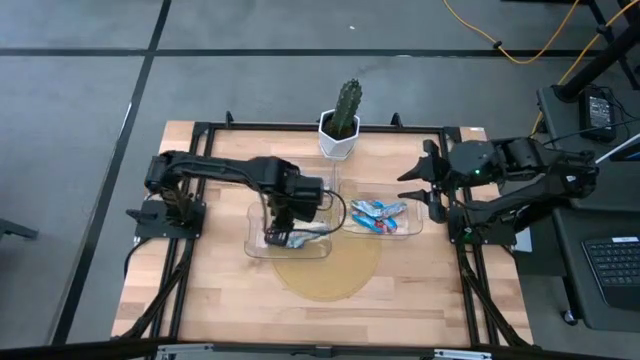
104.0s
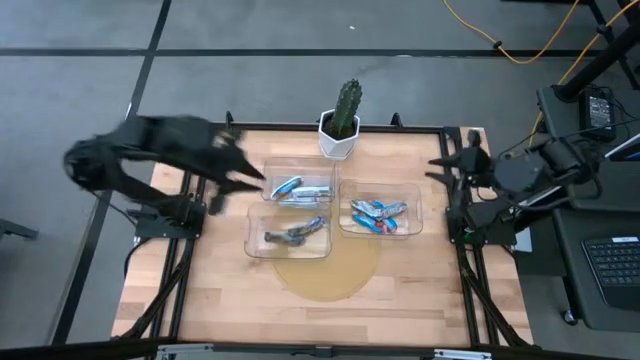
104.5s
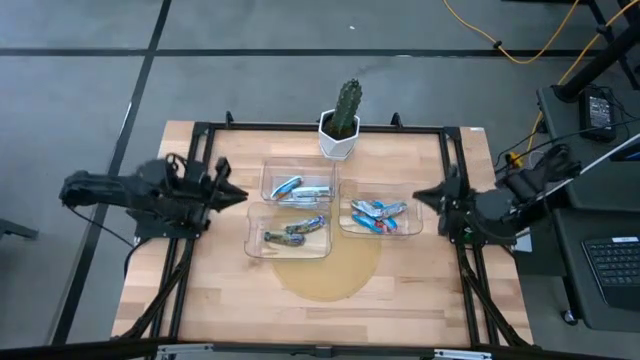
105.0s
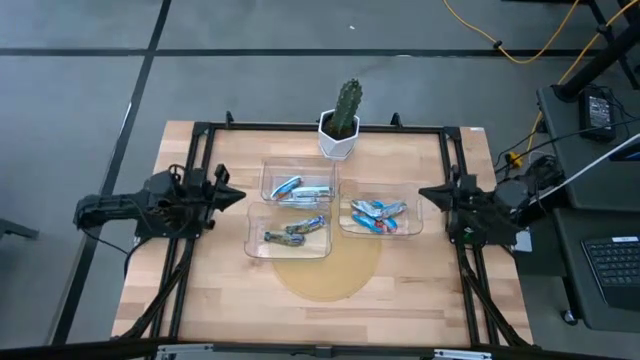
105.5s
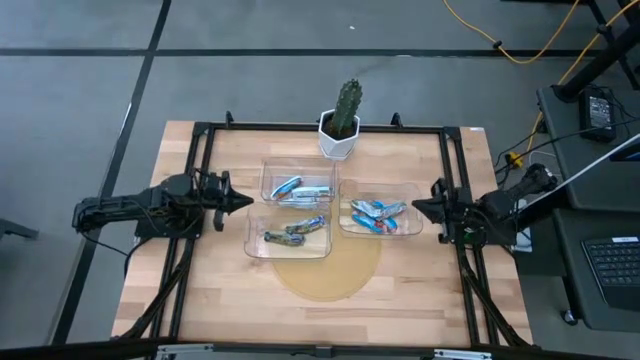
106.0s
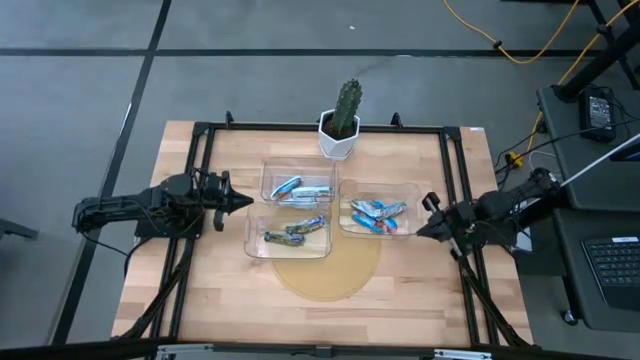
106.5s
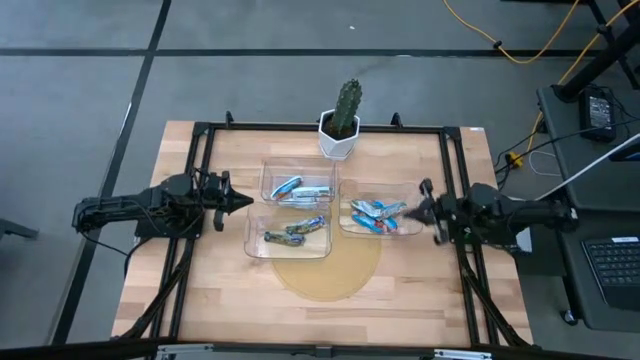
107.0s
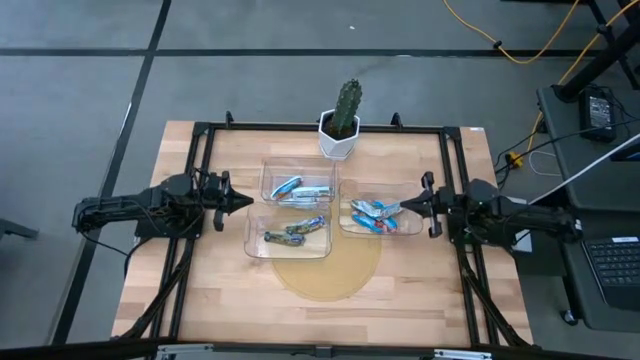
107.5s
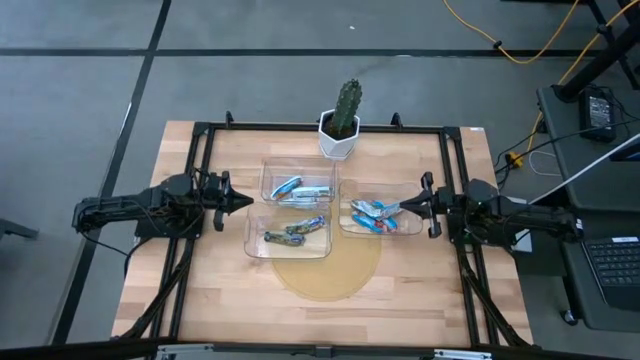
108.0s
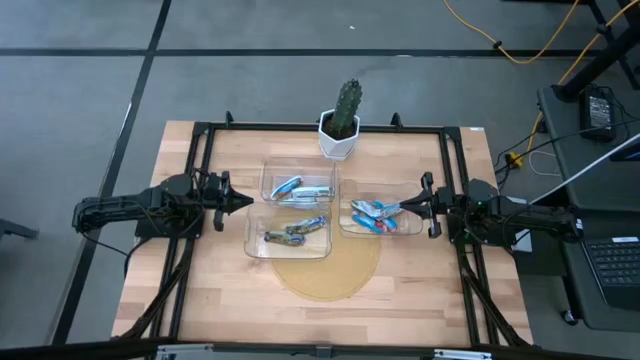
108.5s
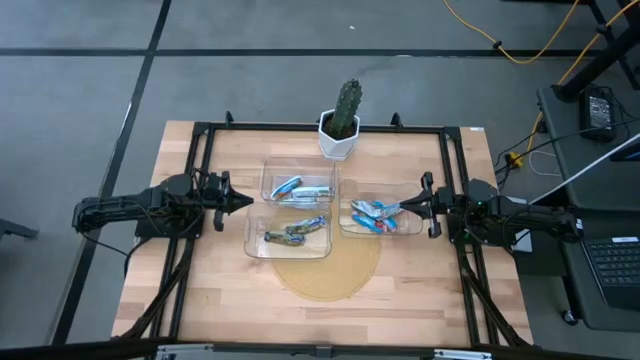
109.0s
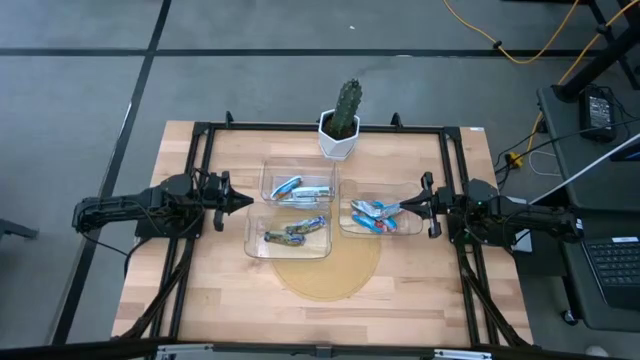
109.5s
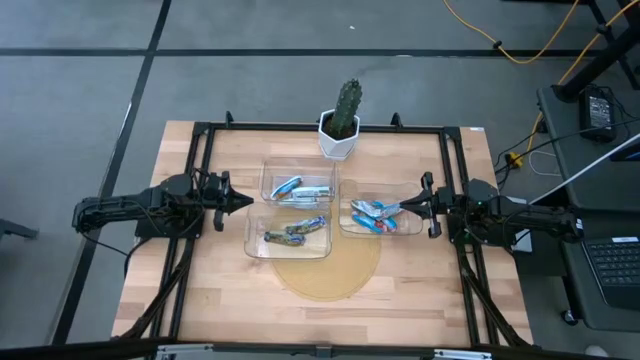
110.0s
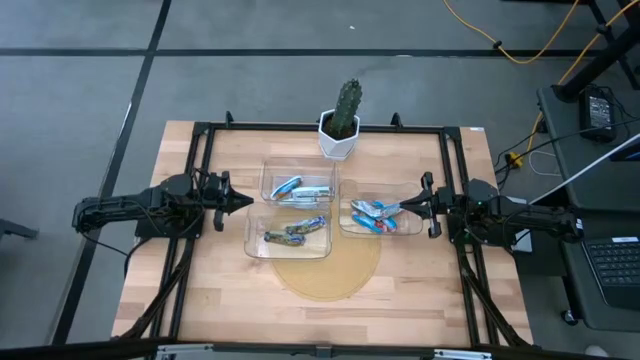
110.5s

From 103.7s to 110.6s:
Task: Pick and place Granola Bars by type
Return to Home Position

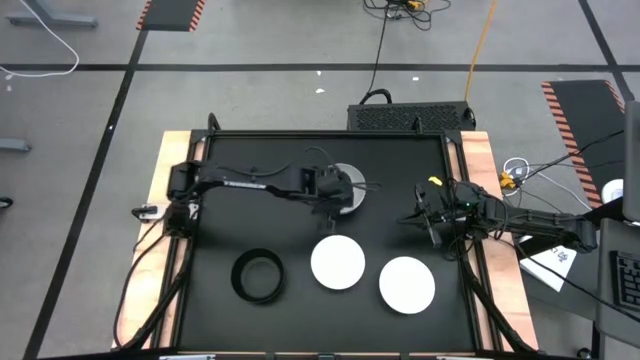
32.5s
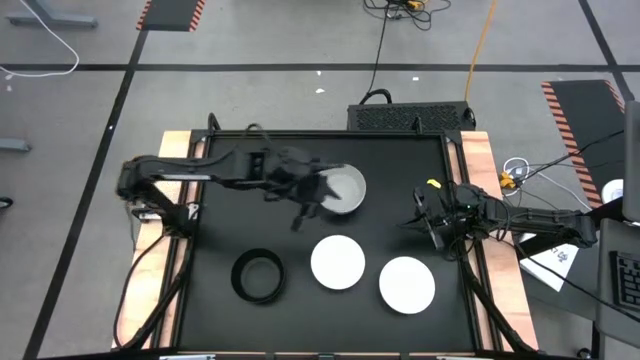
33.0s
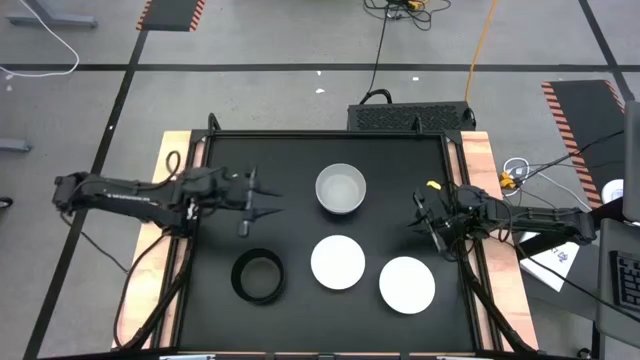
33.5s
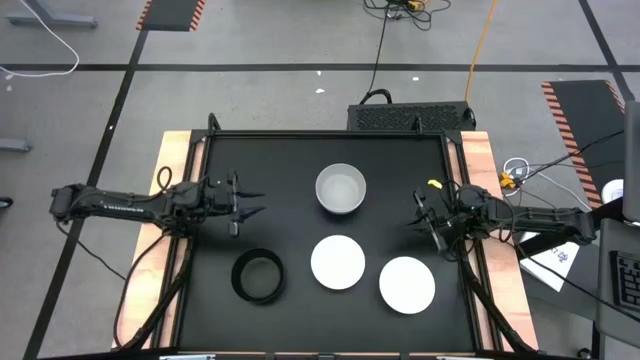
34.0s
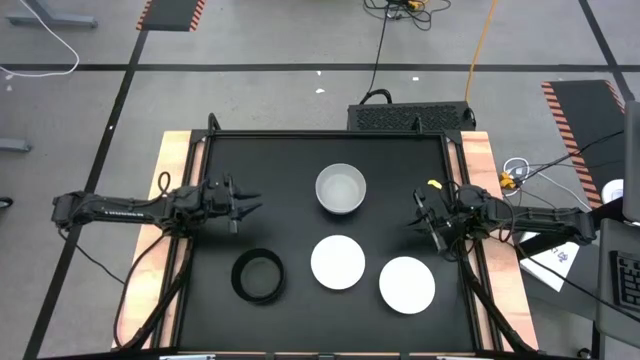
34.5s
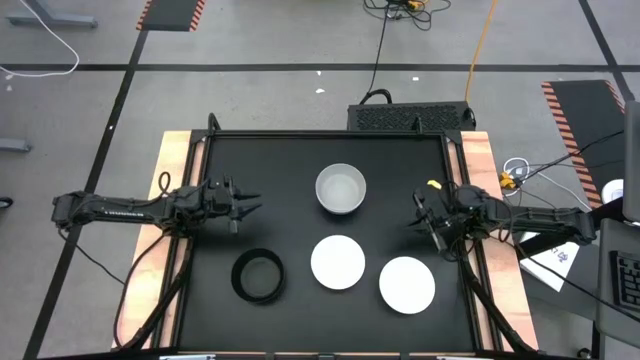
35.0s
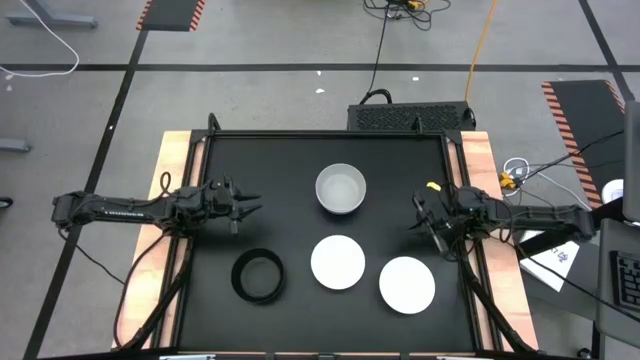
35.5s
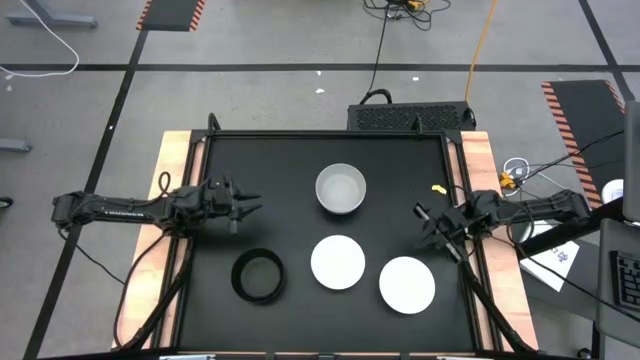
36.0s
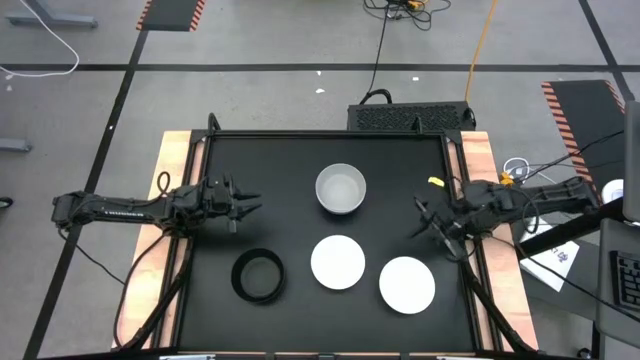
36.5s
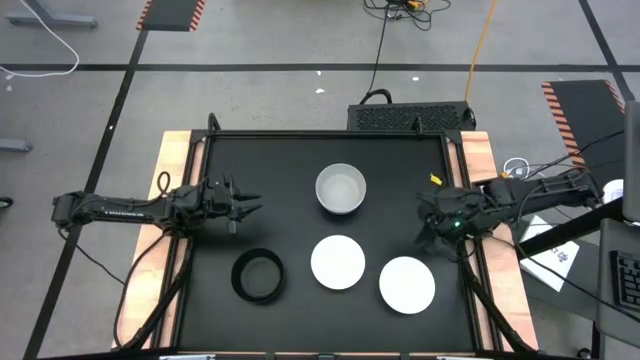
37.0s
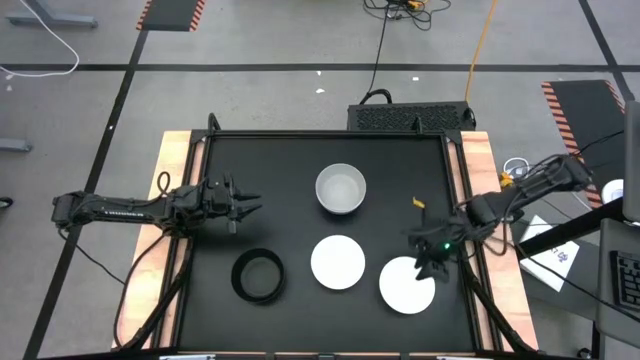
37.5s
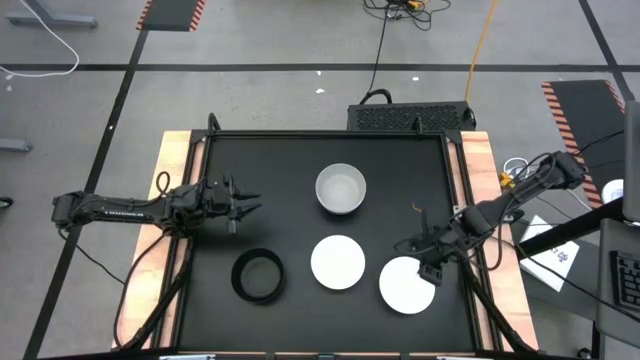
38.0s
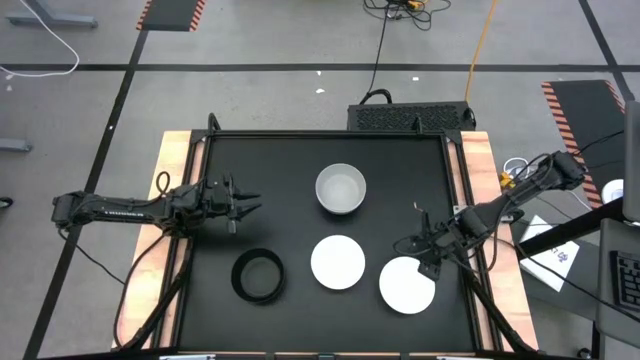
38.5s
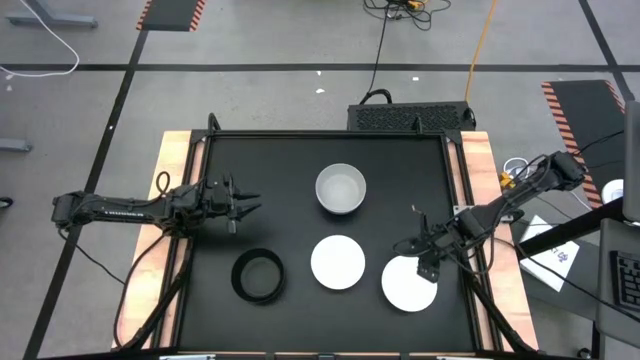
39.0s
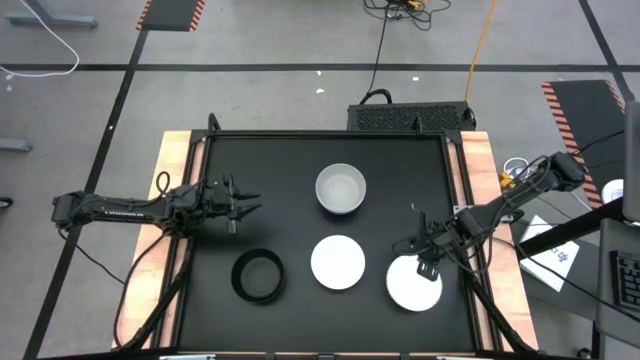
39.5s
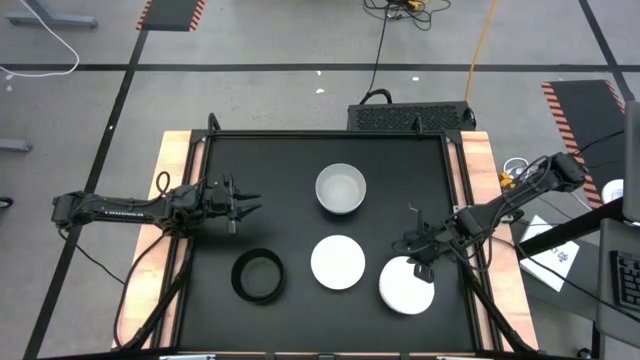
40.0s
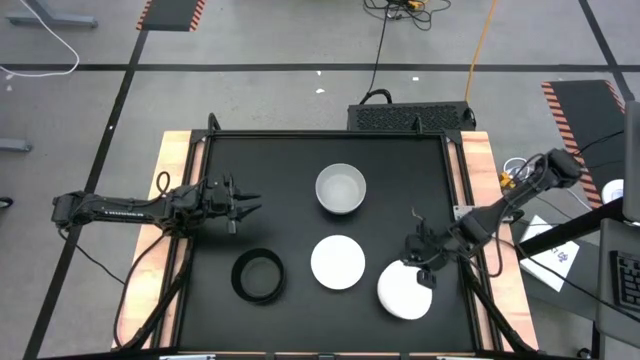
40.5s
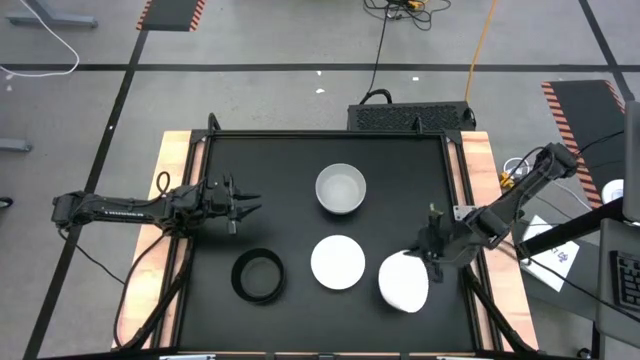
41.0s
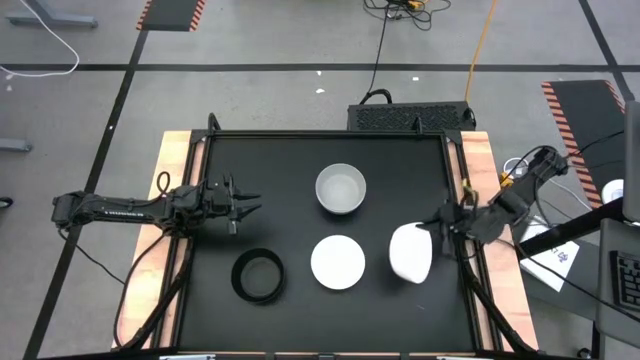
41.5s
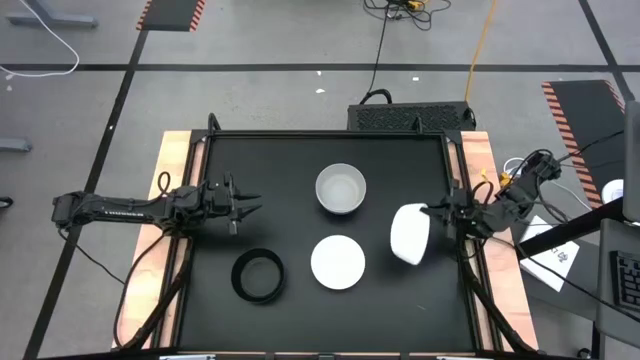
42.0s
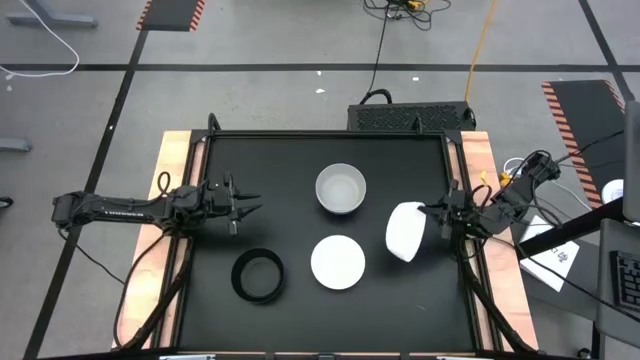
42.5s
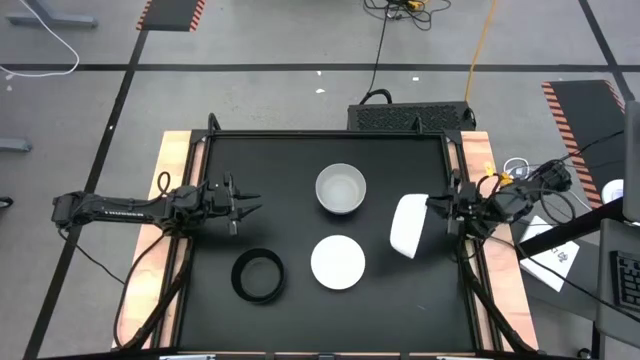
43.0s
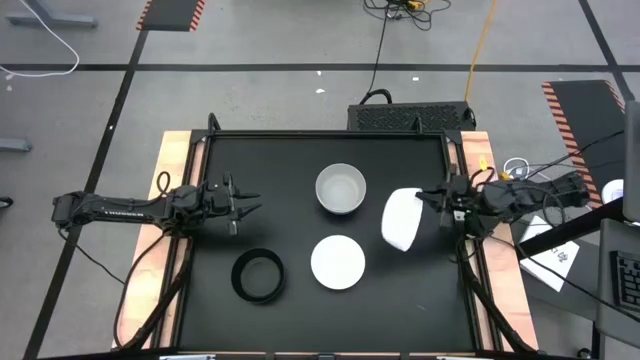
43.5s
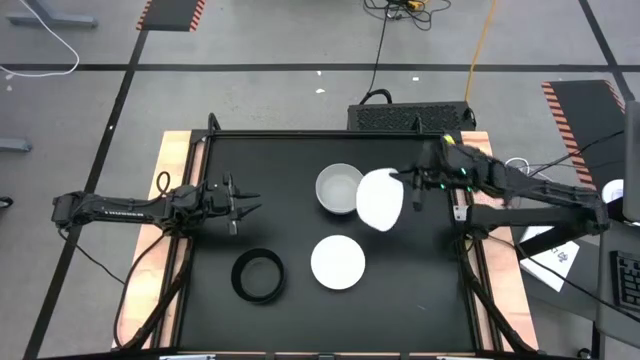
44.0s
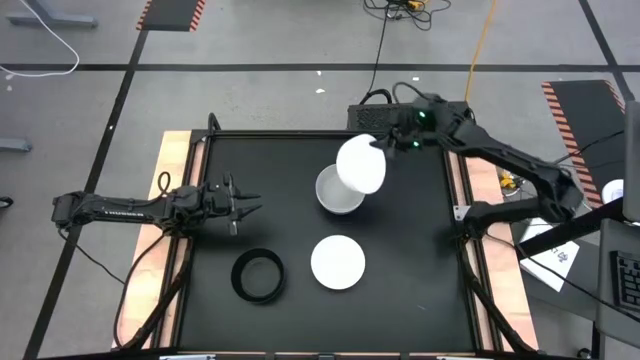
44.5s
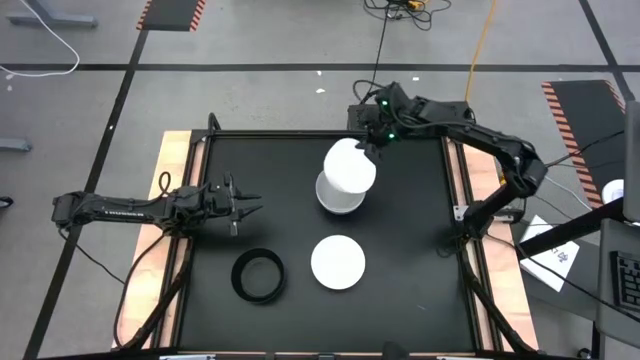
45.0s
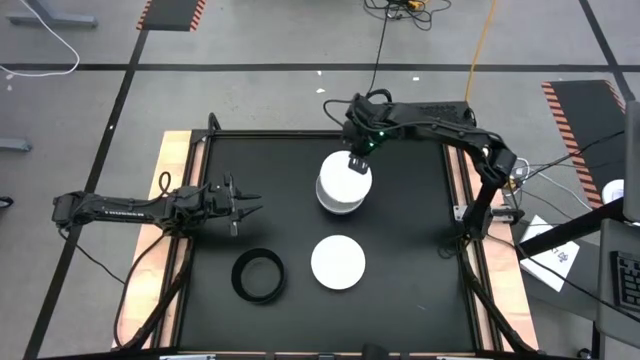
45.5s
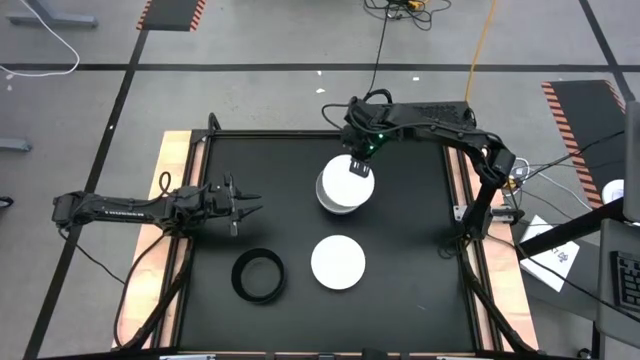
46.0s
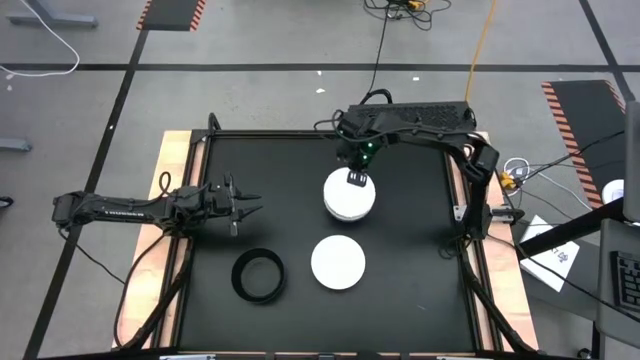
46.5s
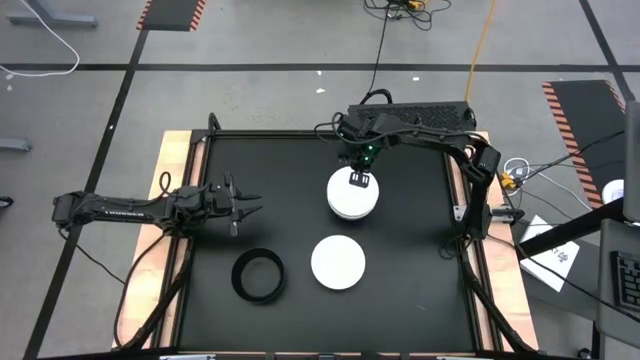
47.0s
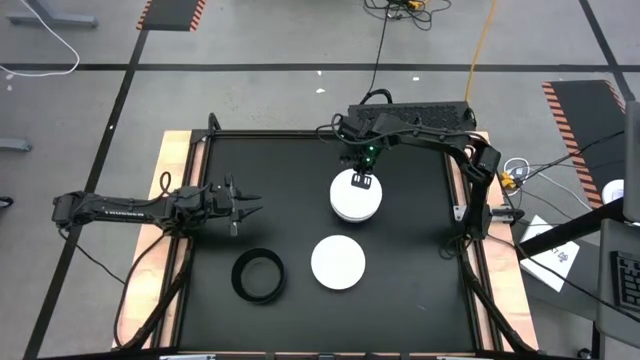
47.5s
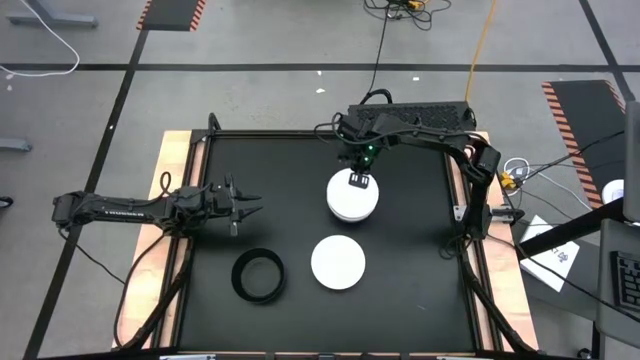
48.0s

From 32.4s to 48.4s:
Task: Nest bowls inside each other
Stack the right white bowl on the top of the gray bowl
